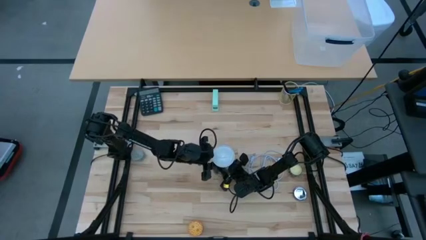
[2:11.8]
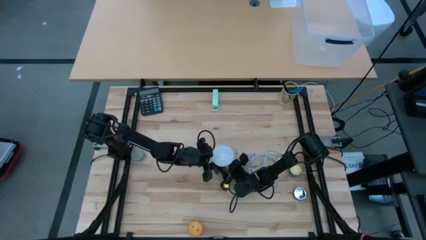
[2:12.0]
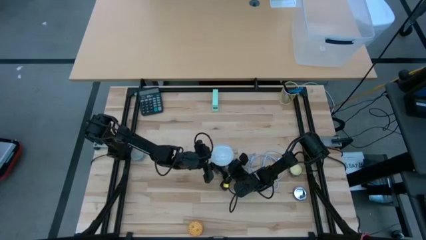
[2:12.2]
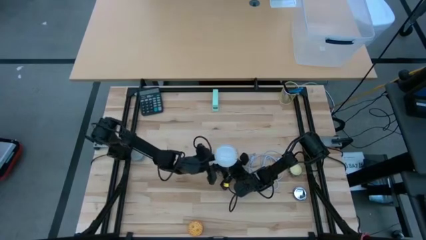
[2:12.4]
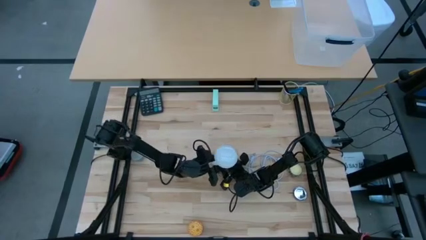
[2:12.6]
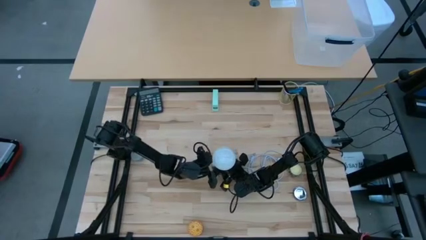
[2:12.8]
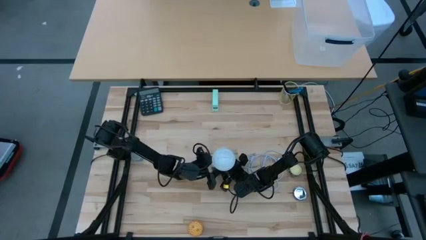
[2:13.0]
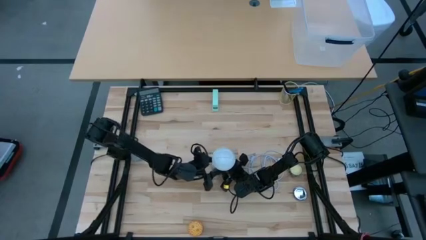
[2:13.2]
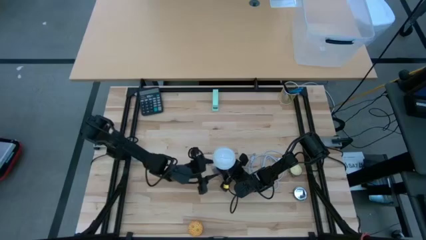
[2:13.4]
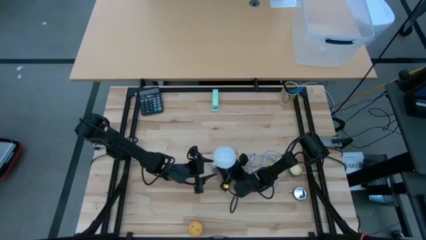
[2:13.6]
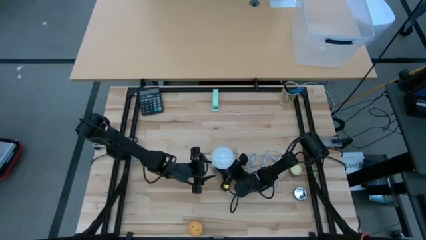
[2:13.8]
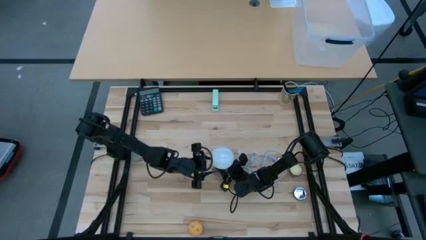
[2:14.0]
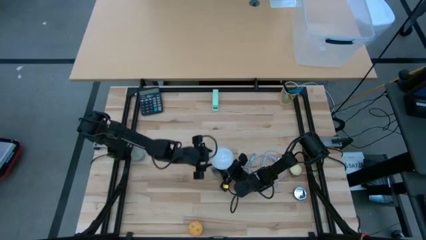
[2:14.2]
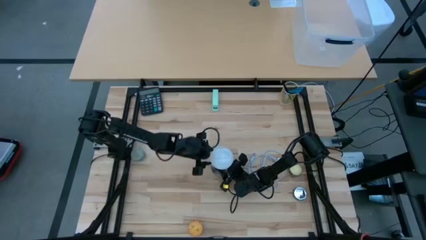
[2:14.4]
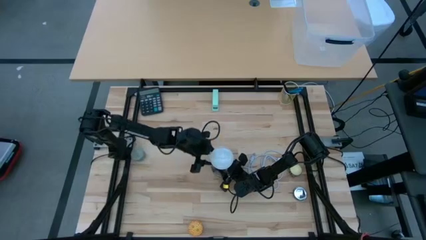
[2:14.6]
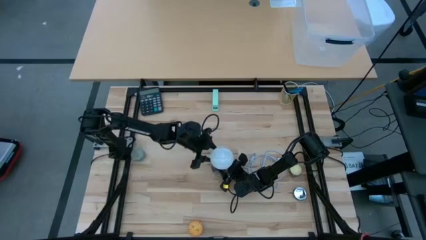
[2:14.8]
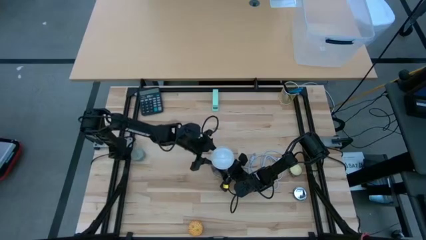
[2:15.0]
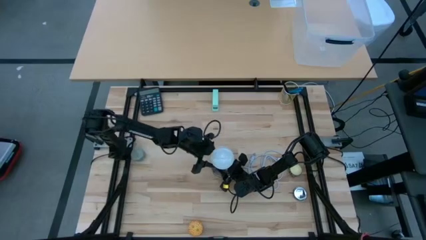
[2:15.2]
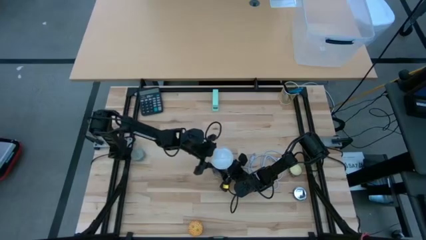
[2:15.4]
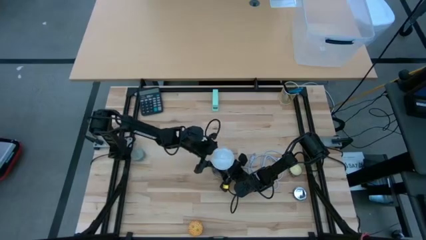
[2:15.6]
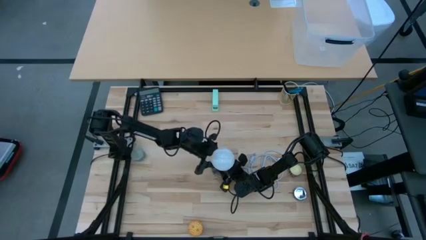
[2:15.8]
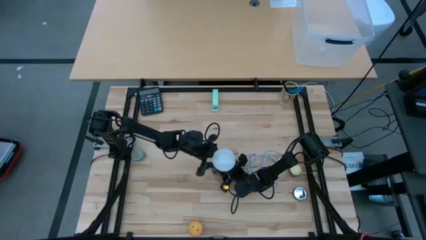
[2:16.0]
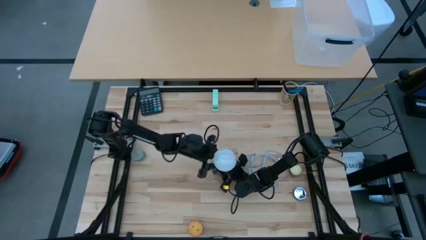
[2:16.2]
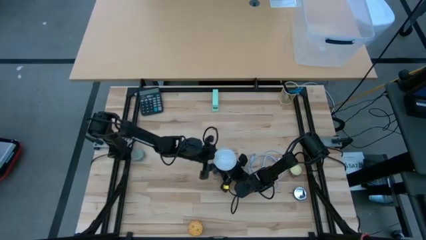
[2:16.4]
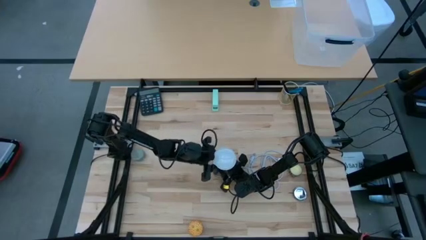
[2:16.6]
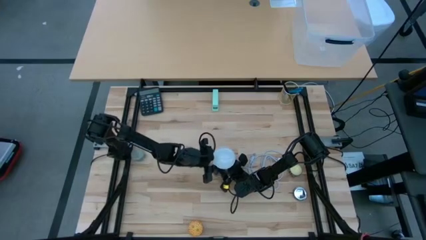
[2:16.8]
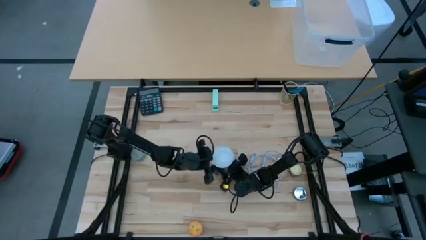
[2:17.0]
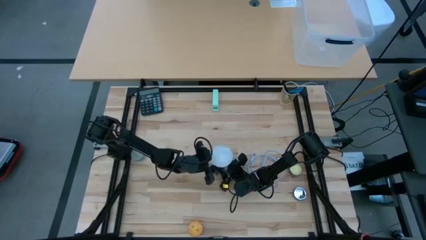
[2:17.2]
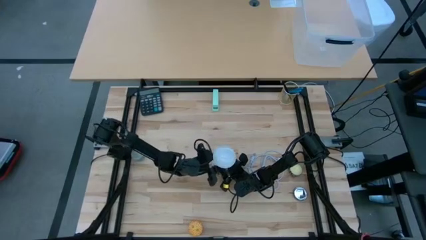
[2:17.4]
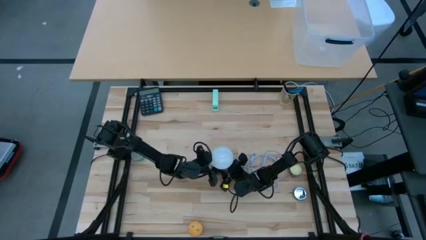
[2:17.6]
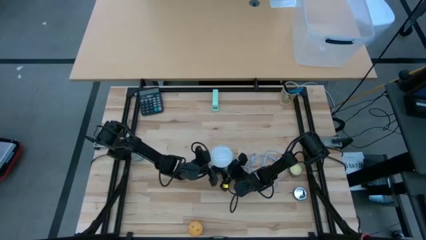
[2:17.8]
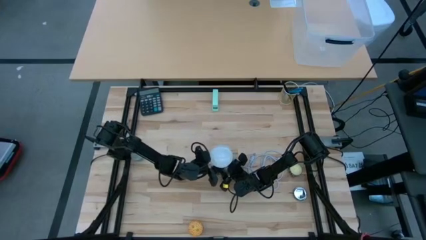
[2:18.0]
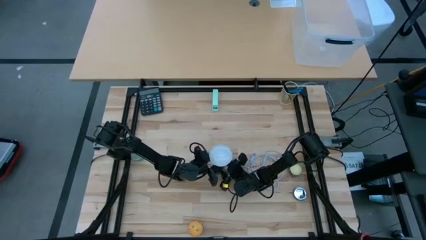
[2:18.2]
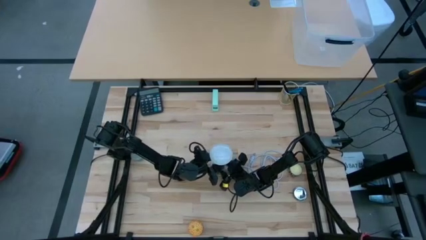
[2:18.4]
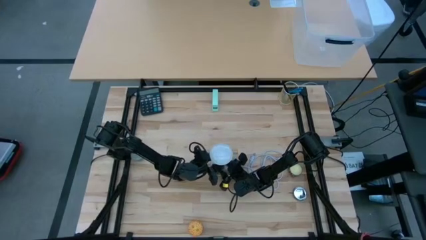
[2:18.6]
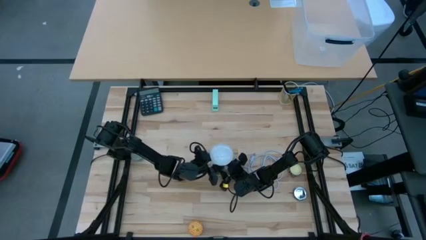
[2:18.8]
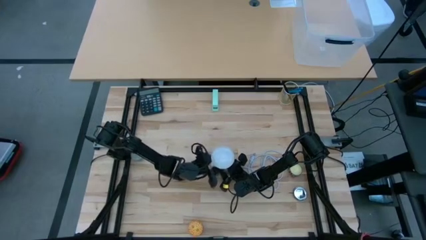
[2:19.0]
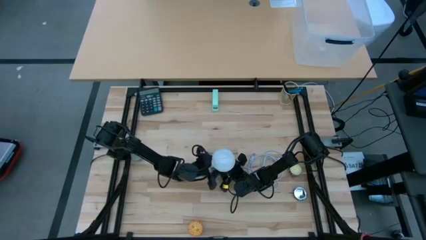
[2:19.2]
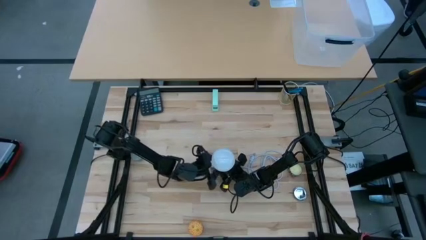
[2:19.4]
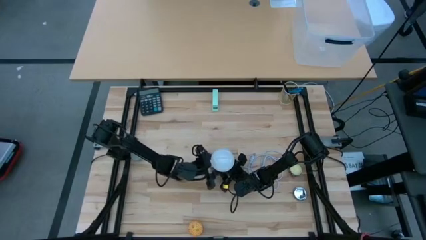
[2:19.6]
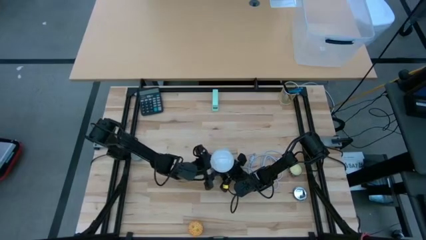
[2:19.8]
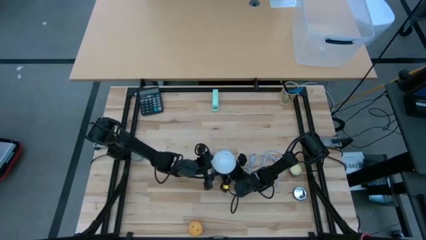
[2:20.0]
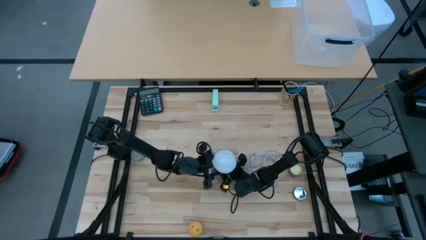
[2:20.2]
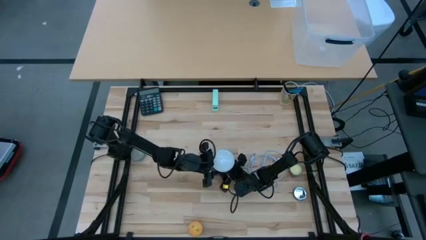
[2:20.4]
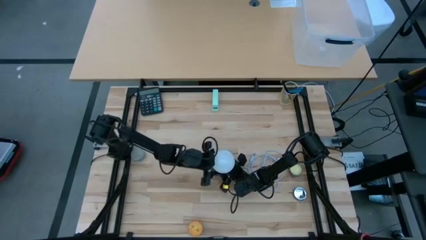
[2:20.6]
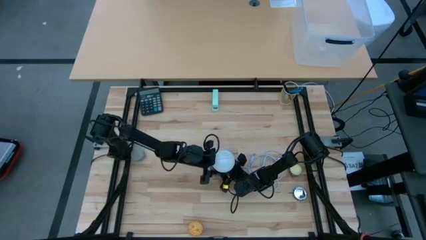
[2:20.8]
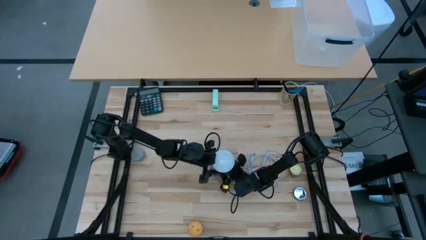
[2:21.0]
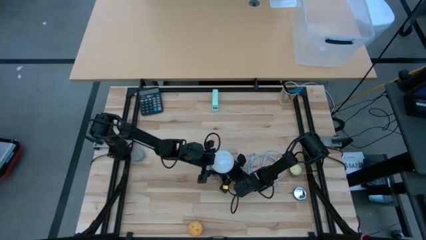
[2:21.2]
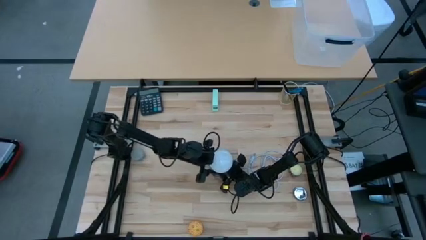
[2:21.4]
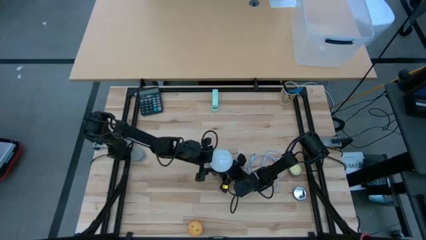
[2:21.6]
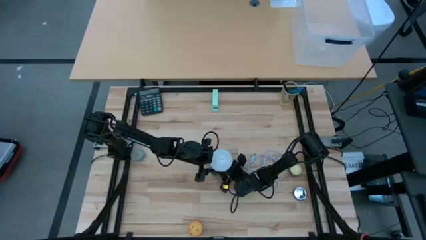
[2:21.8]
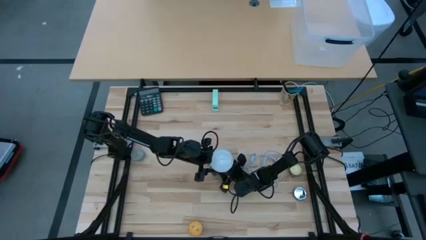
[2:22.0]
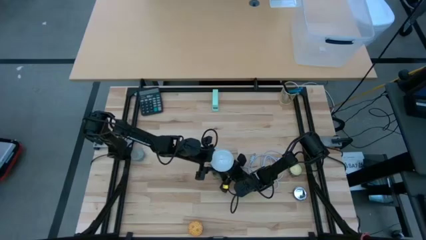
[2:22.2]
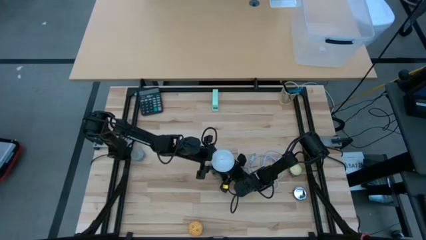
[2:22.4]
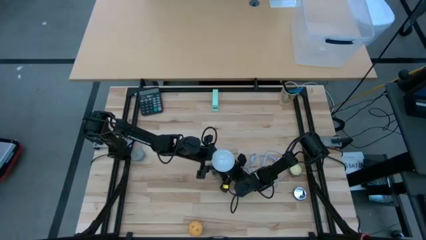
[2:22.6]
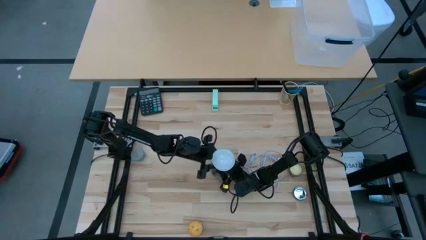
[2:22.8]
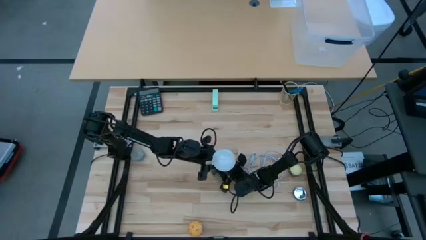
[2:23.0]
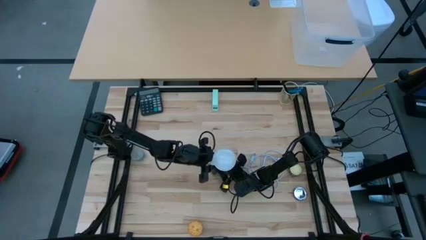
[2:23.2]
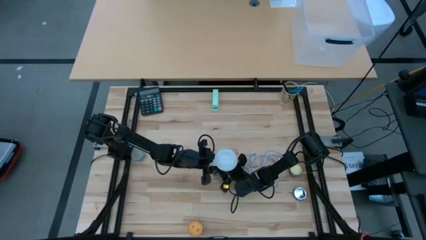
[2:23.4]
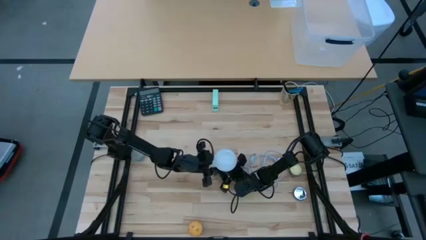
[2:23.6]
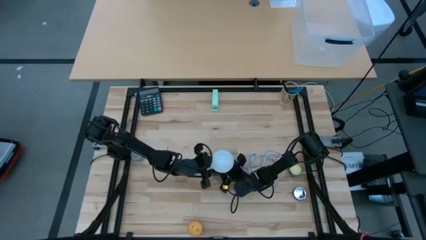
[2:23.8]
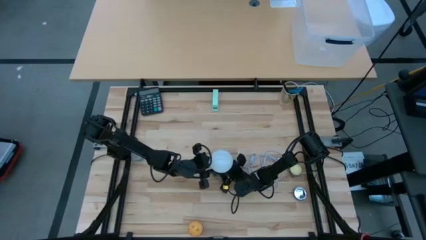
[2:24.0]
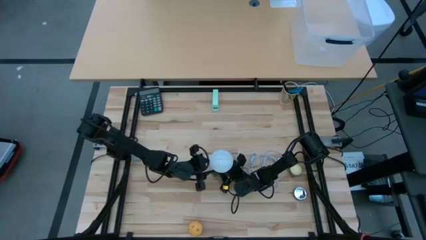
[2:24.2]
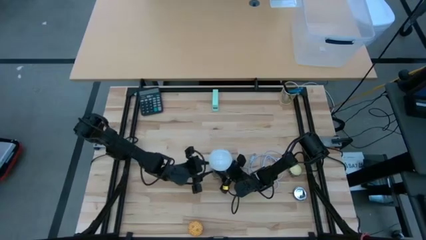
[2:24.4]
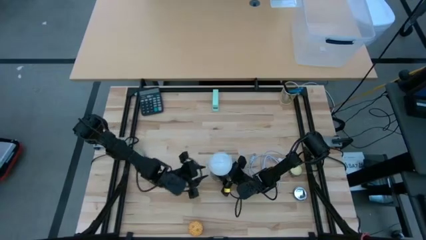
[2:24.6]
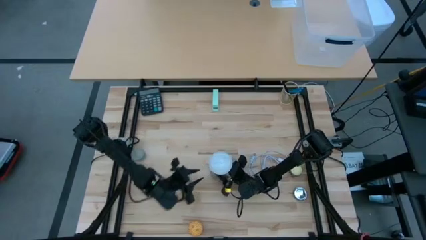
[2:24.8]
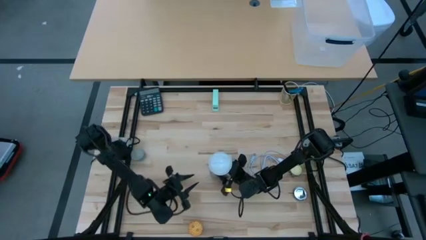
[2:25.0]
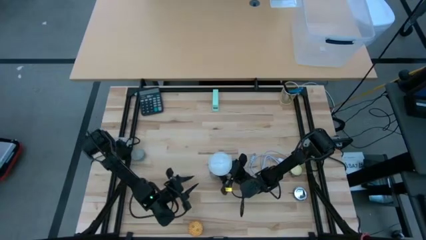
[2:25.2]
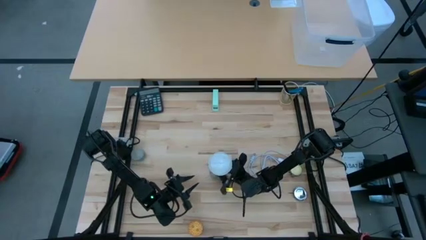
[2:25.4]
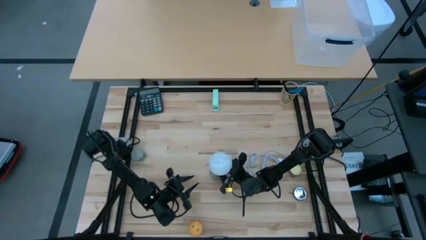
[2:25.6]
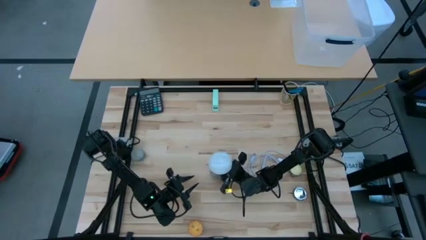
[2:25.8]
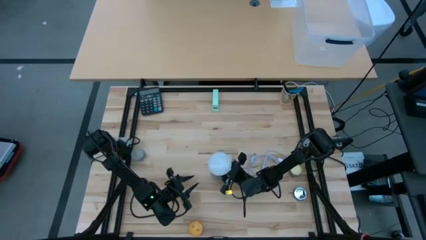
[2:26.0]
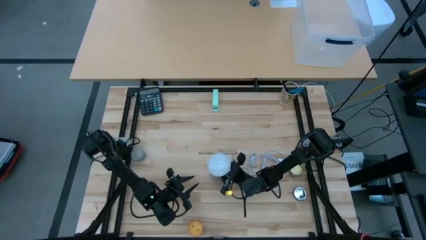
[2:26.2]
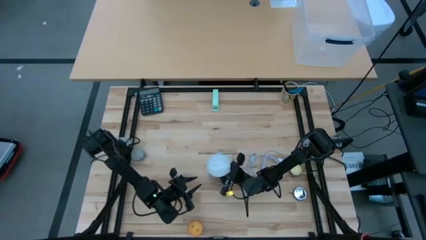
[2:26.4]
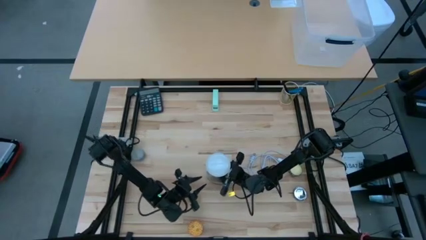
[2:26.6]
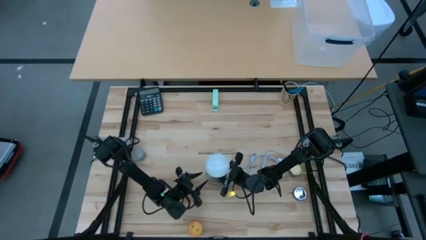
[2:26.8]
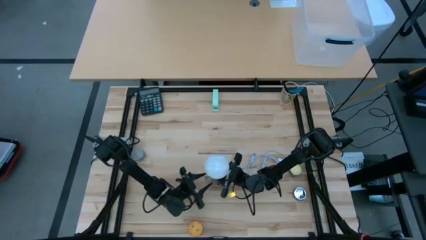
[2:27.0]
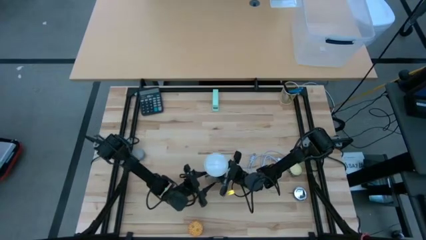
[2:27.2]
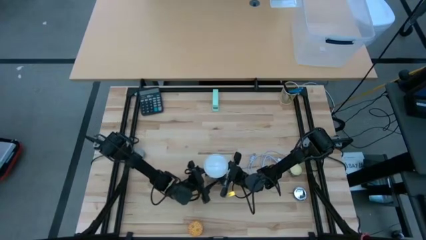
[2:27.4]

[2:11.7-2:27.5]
Task: Screw lightbulb
Remove the white lightbulb from the silver lamp
